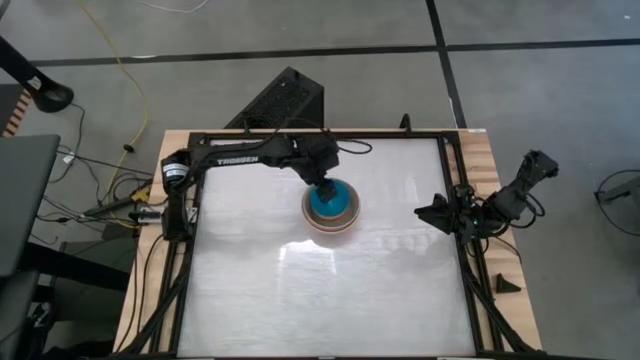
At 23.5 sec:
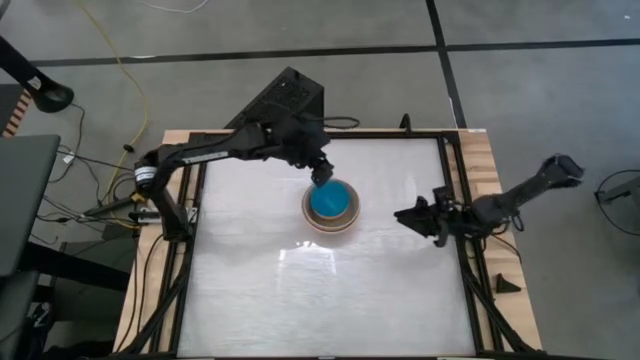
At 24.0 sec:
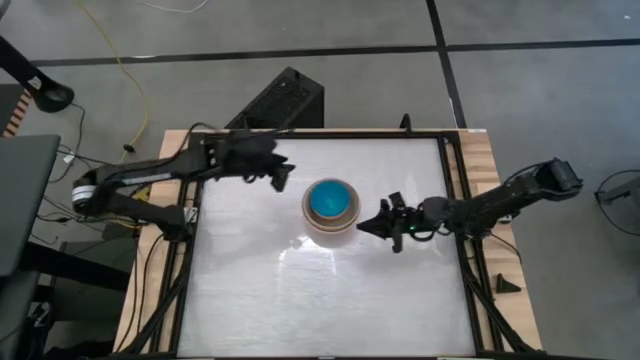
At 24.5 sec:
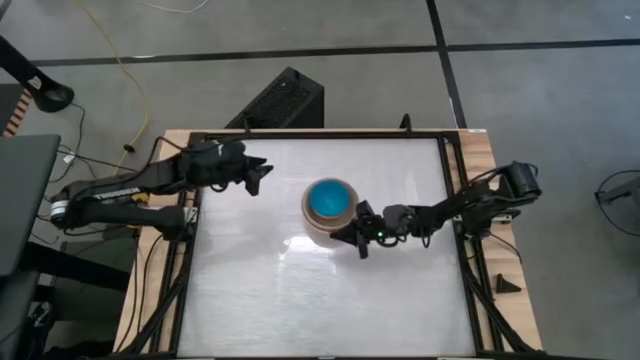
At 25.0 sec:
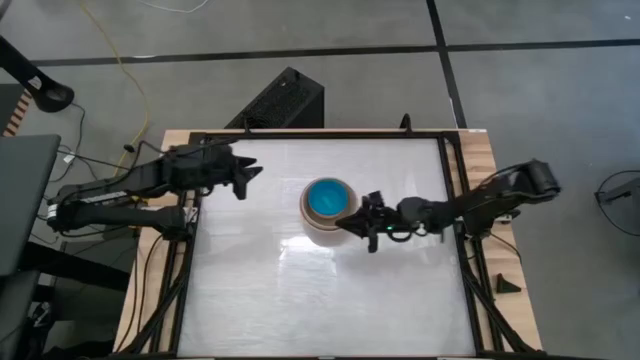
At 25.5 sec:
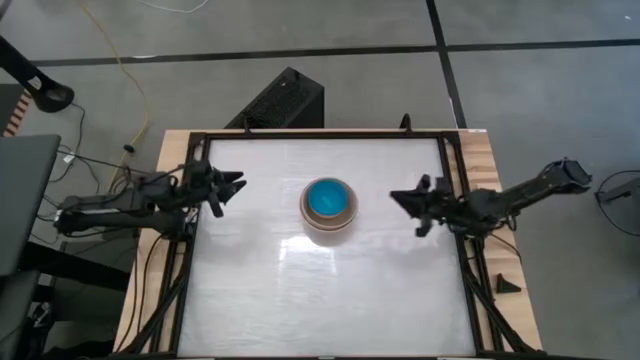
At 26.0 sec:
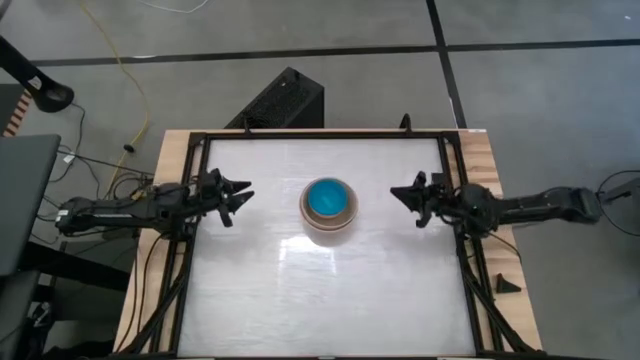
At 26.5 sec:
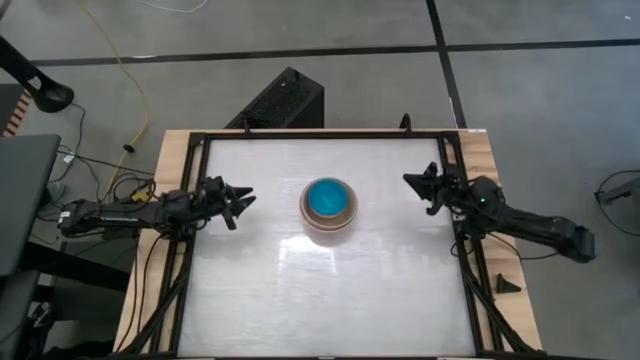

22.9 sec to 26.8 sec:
Return to Home Position
